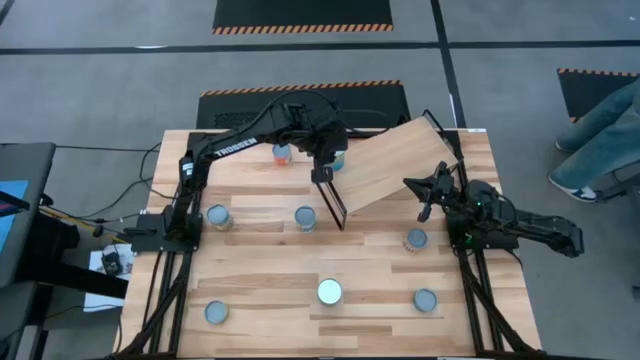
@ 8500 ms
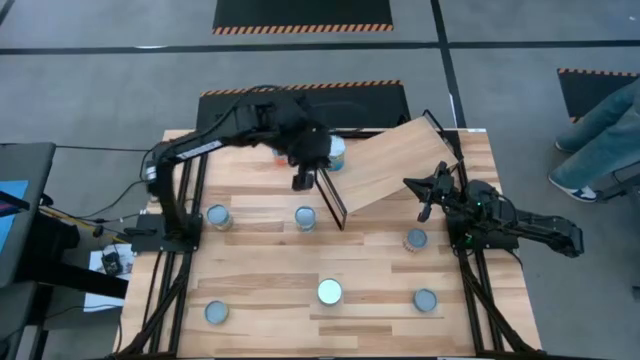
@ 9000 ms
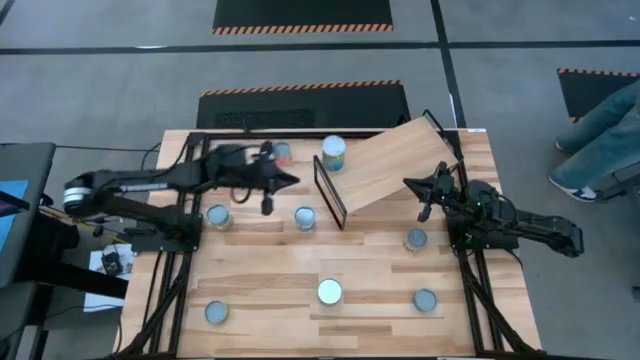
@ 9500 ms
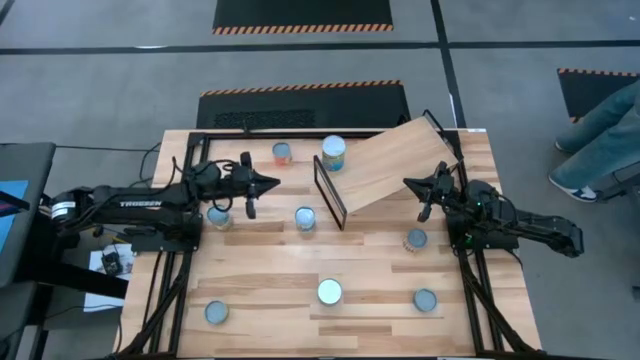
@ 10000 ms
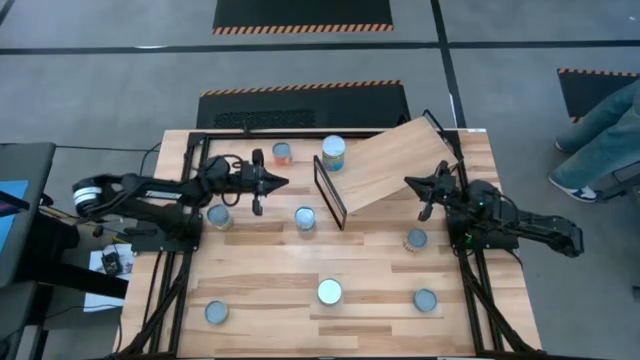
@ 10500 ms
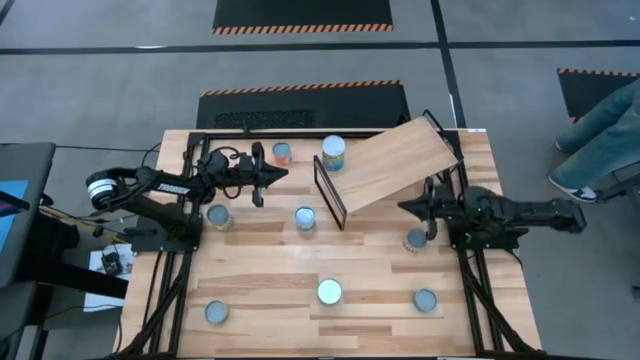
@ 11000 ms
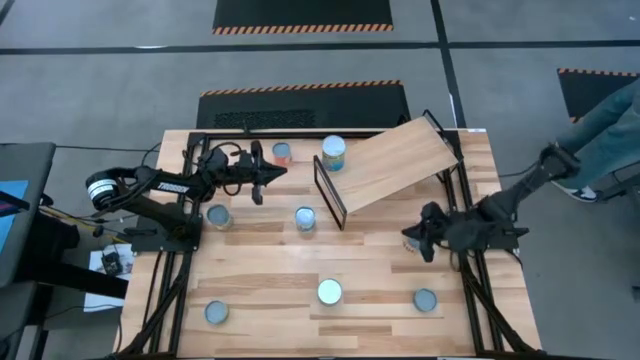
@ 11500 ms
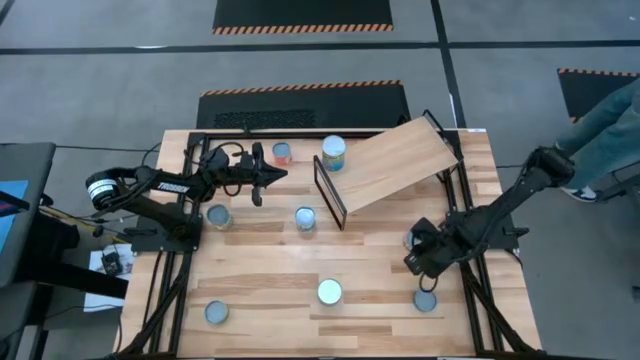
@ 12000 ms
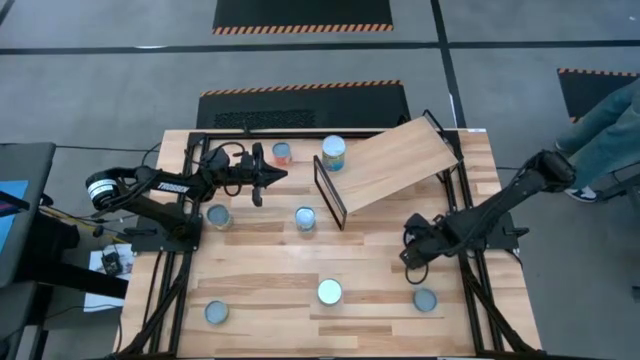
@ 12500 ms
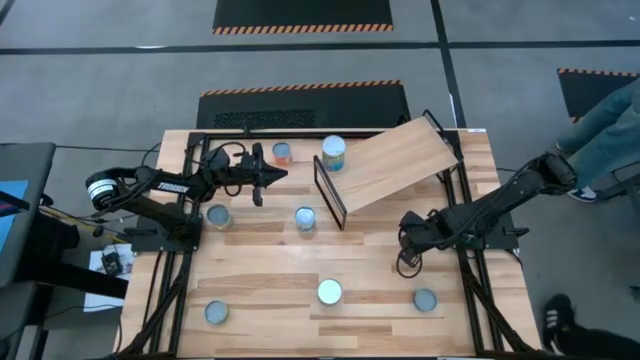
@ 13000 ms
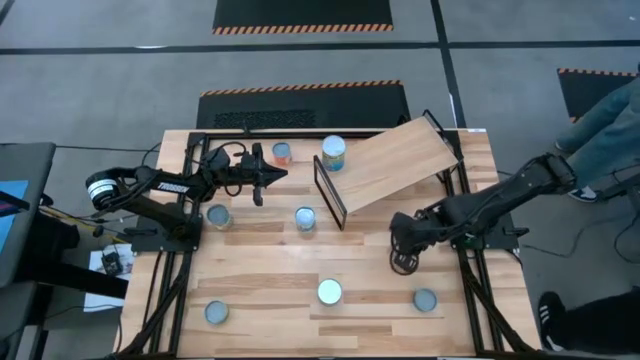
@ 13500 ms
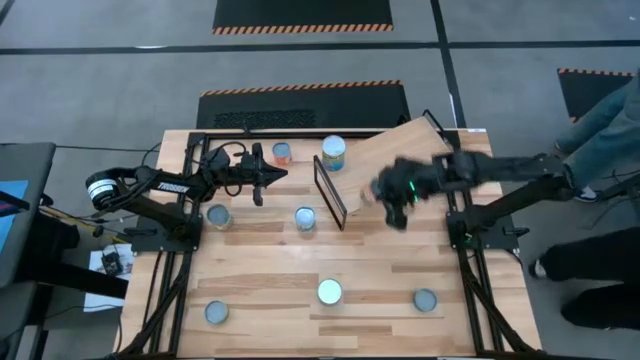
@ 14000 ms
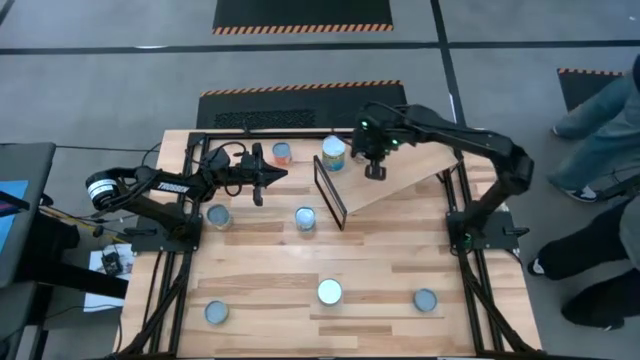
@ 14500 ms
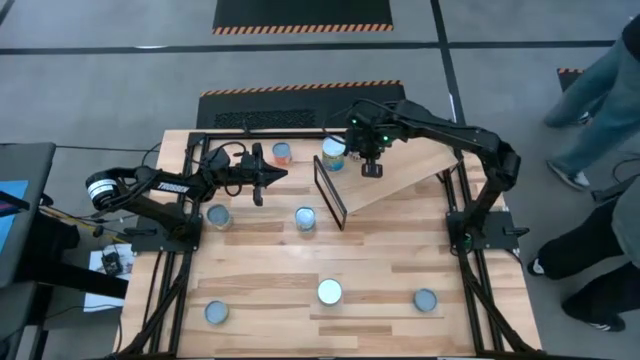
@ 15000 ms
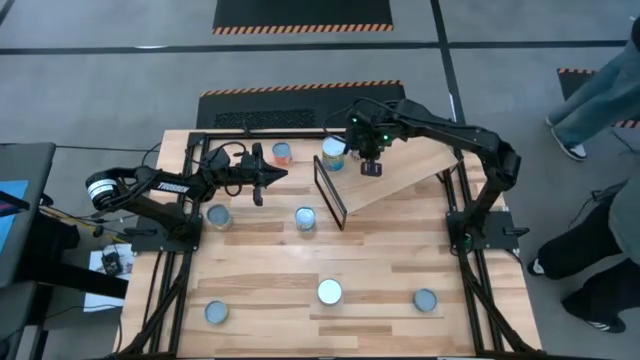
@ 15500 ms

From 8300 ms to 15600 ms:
Task: Pick and place cans onto a shelf
Put the can of beans on the shelf

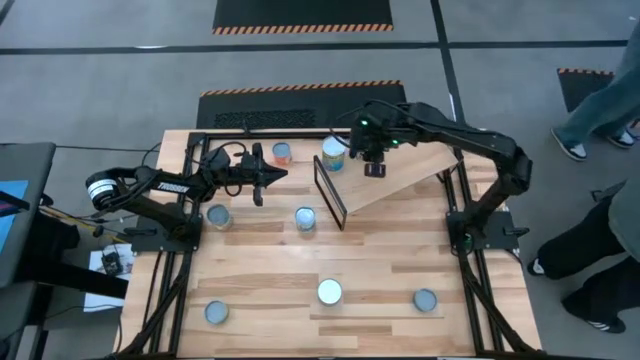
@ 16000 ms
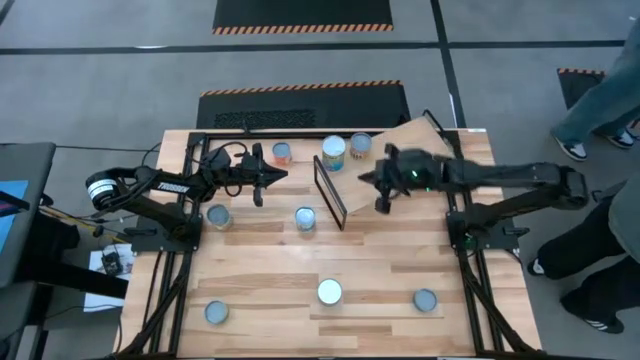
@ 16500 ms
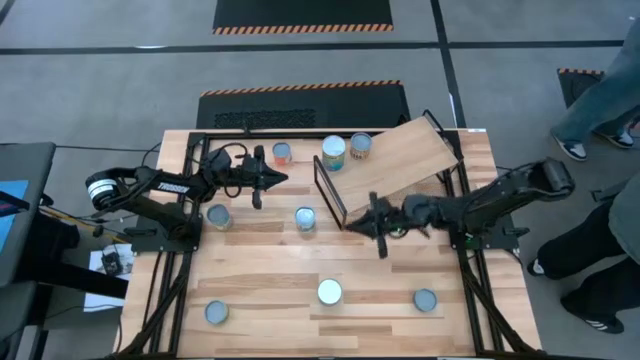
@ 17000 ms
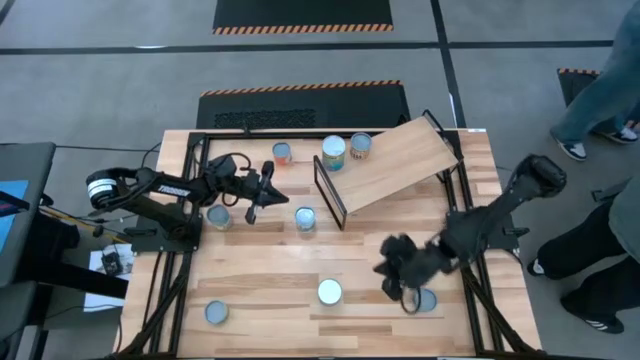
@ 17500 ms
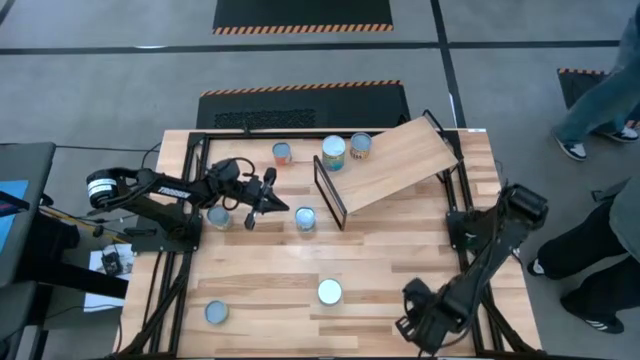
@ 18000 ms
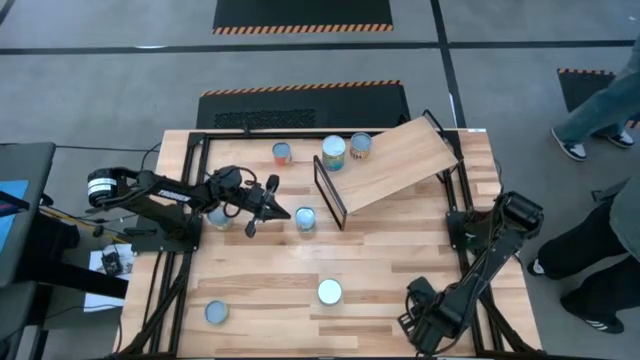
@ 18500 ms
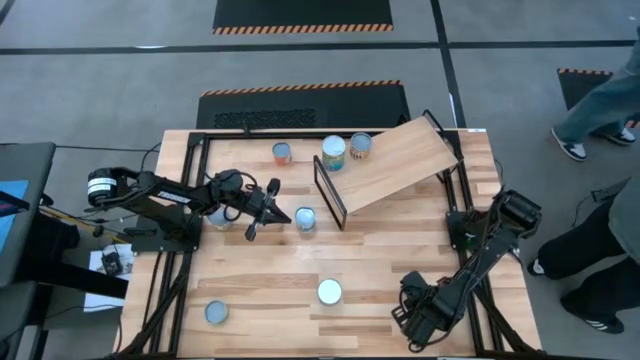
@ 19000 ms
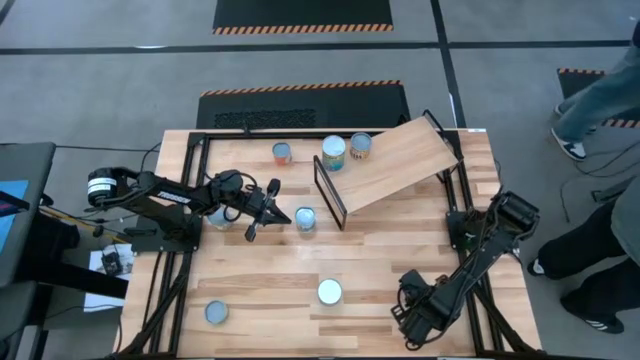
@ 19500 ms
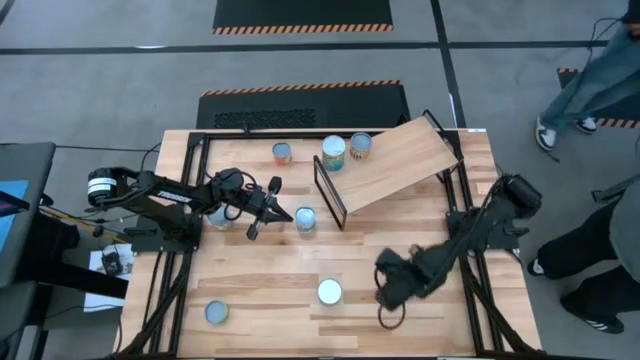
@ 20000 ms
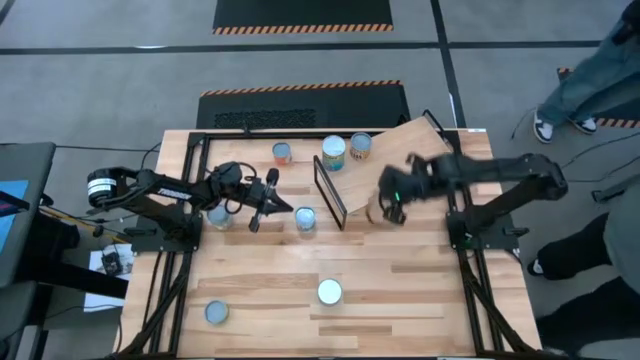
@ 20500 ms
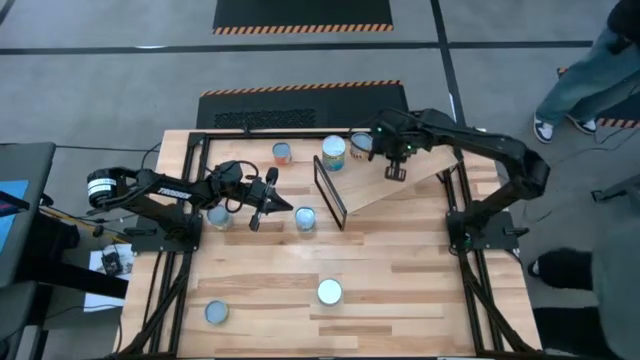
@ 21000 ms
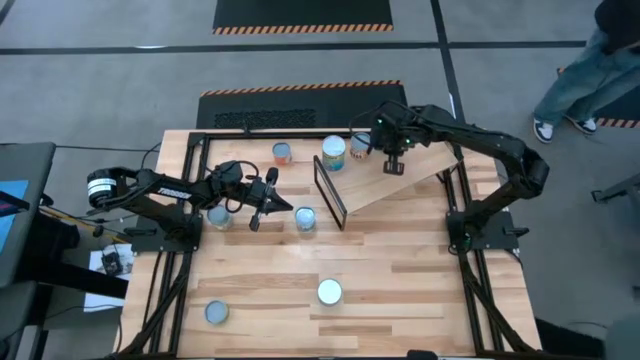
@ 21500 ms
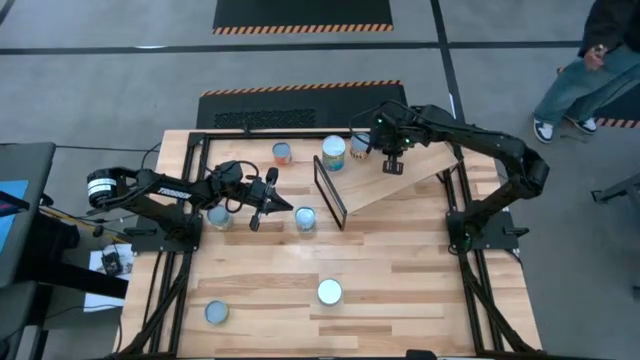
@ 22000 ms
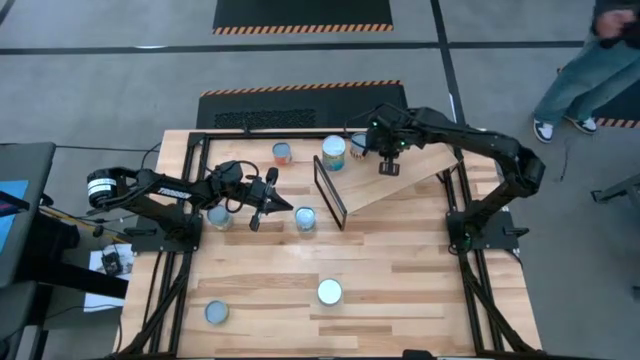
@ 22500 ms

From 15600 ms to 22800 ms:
Put the can of tuna on the shelf

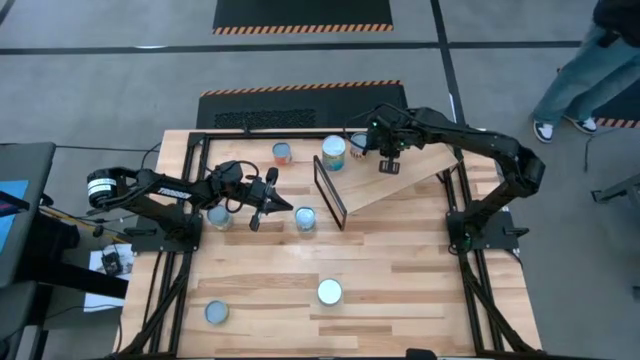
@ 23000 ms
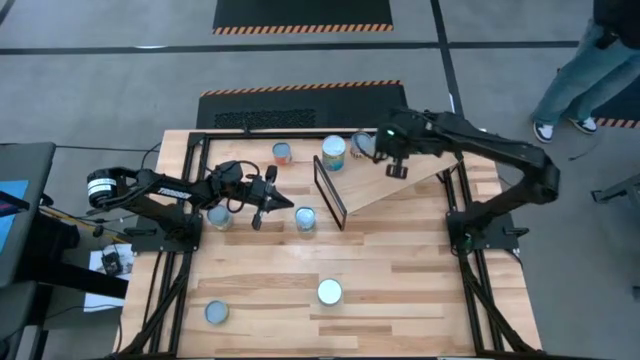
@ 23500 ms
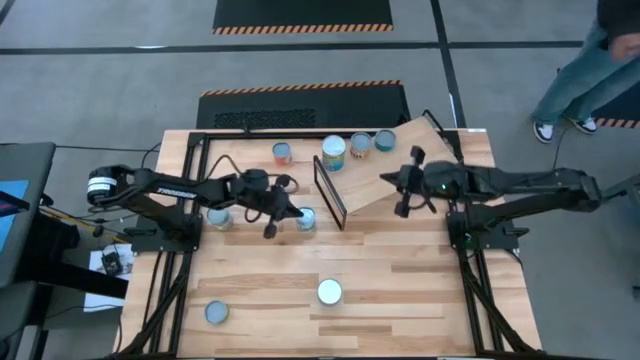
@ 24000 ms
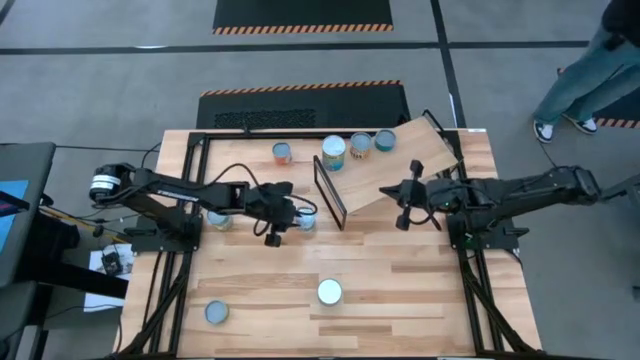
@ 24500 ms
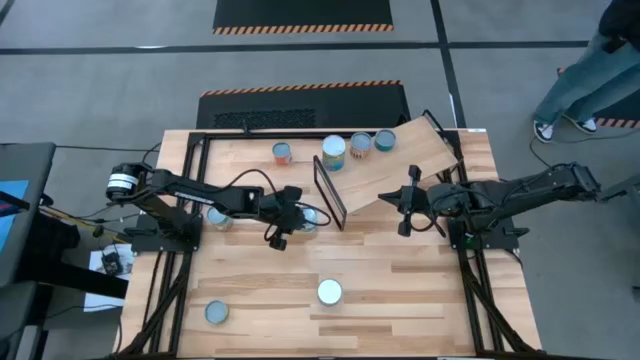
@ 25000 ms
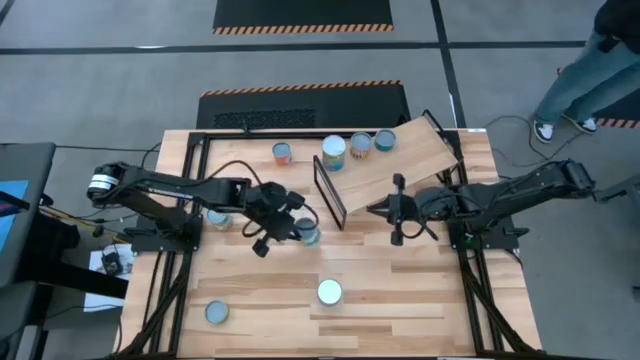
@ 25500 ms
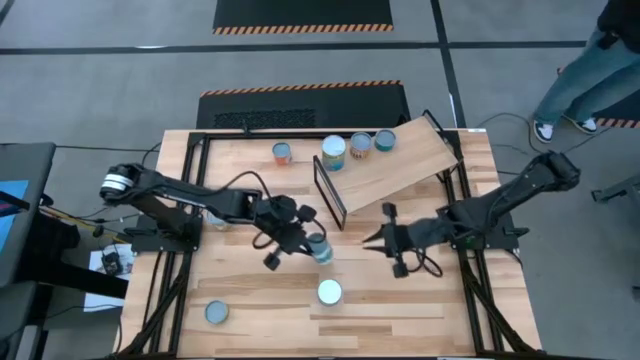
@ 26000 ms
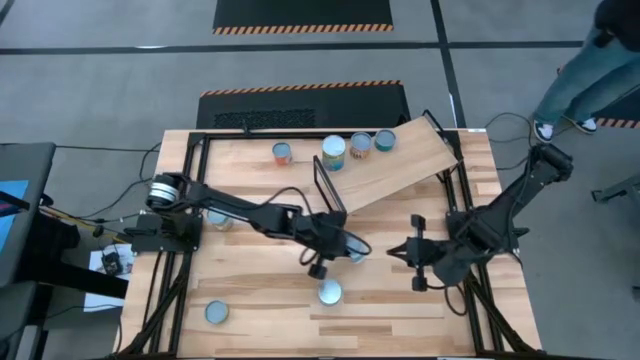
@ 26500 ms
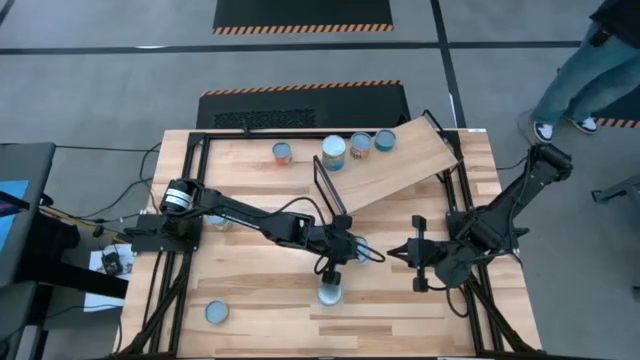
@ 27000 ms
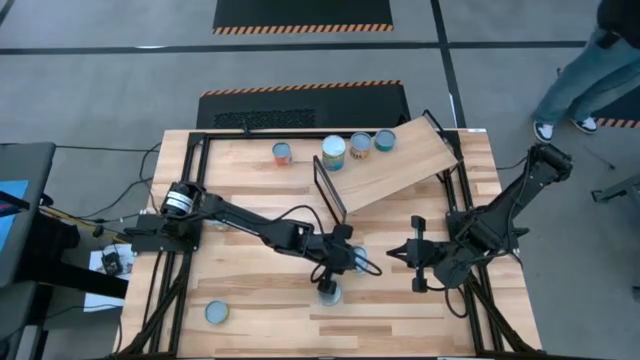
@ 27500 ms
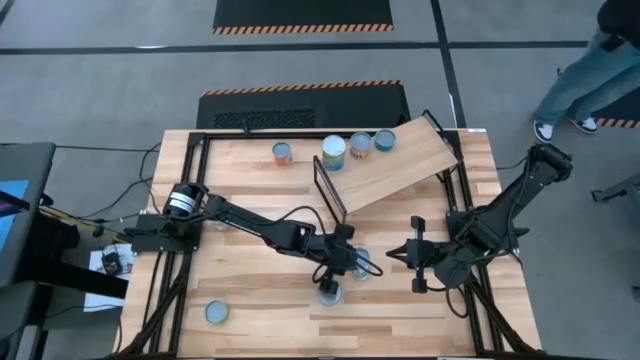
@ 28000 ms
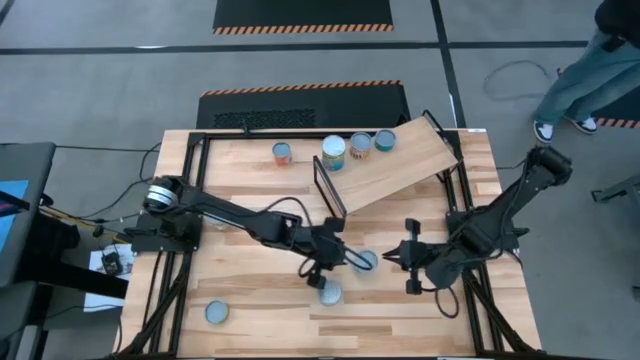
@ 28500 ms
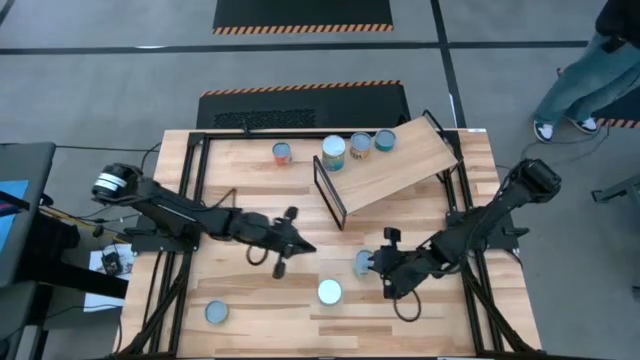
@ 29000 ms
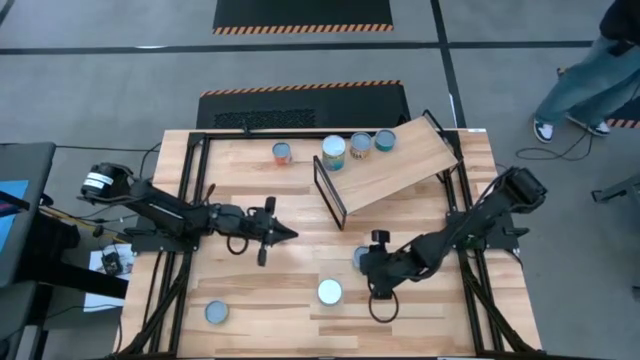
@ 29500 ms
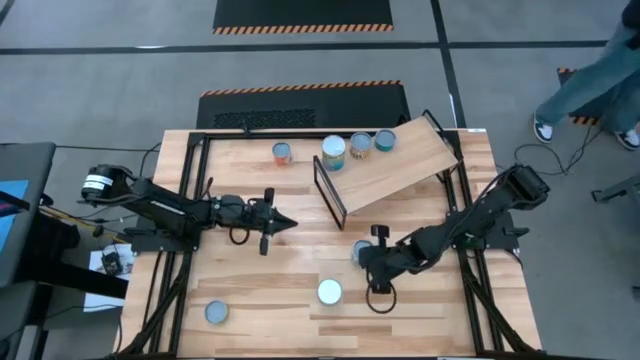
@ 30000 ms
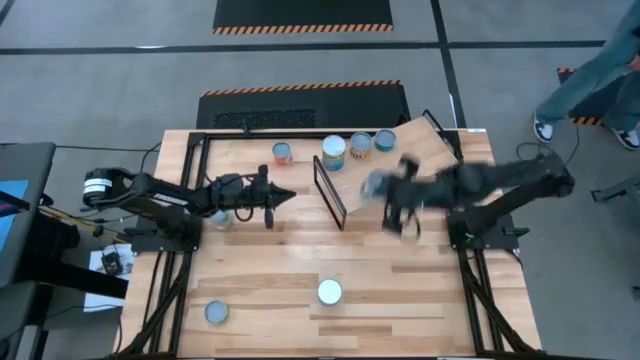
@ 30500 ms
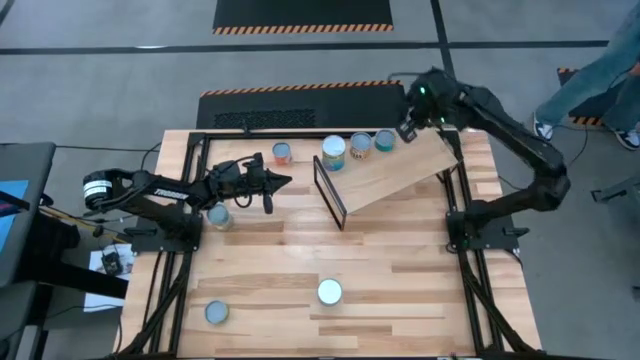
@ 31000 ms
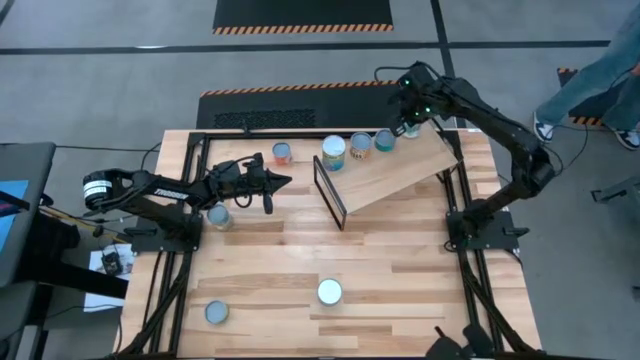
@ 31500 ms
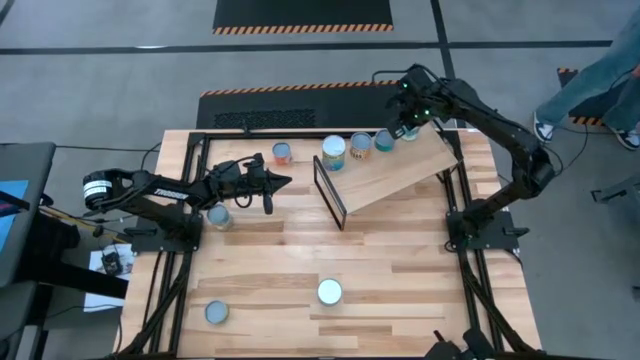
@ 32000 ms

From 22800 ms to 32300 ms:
Put the can of mixed vegetables on the shelf
